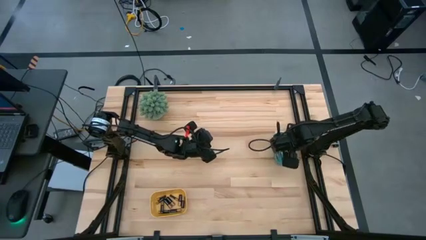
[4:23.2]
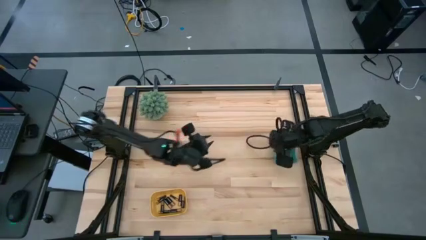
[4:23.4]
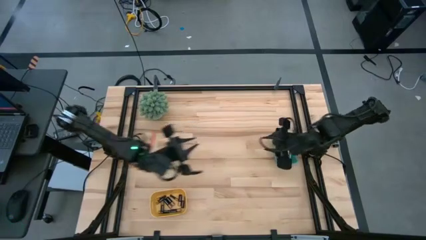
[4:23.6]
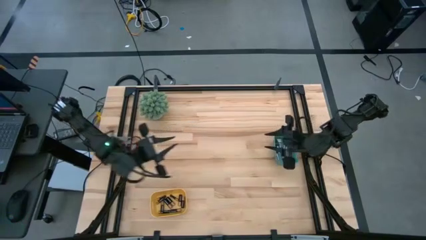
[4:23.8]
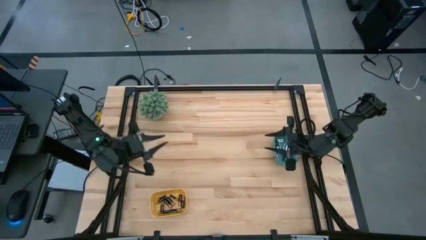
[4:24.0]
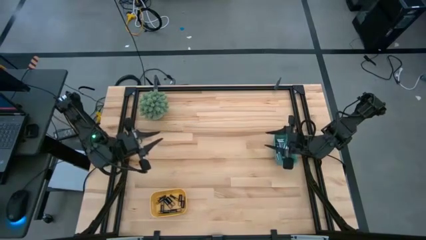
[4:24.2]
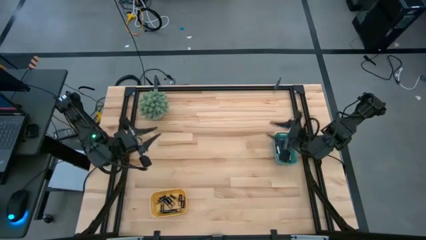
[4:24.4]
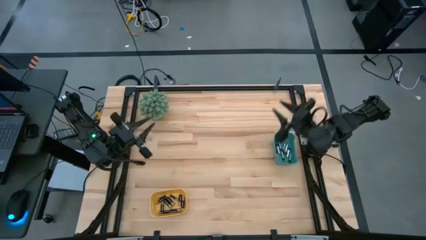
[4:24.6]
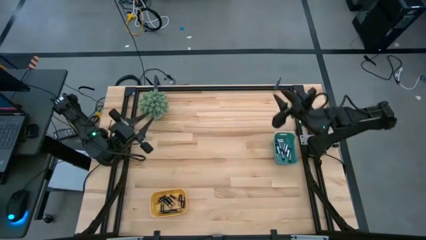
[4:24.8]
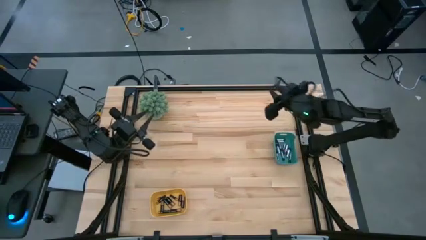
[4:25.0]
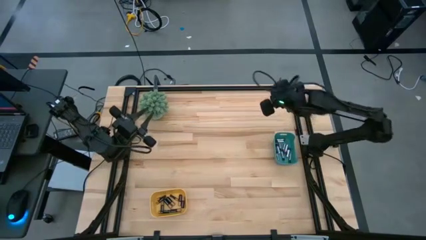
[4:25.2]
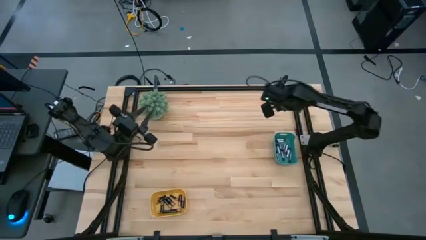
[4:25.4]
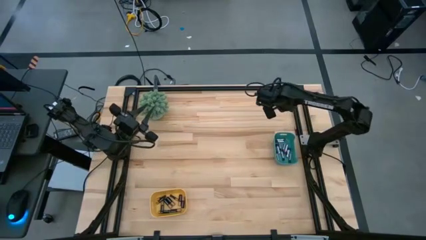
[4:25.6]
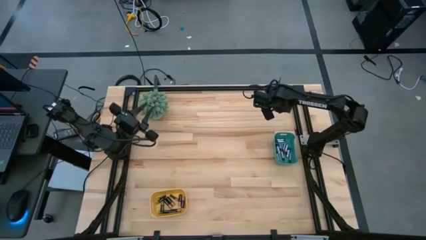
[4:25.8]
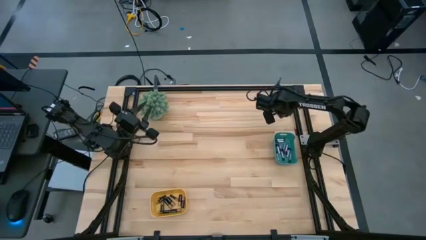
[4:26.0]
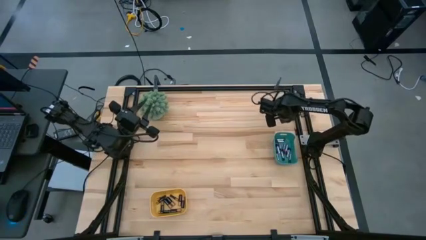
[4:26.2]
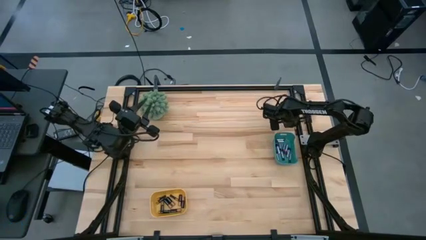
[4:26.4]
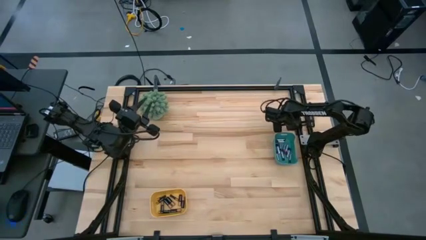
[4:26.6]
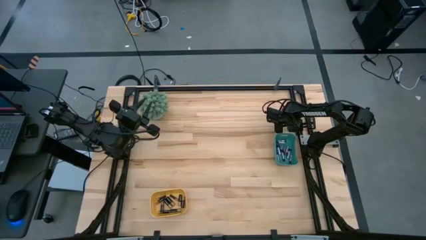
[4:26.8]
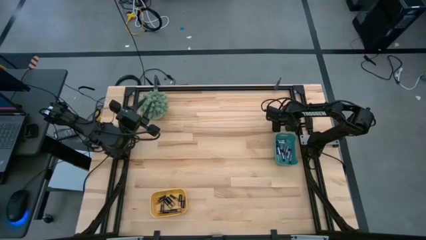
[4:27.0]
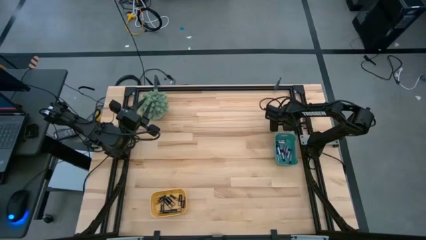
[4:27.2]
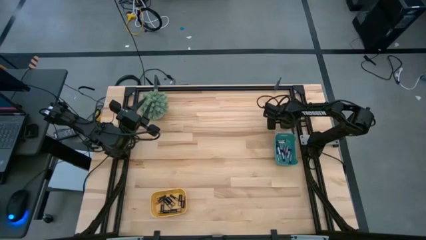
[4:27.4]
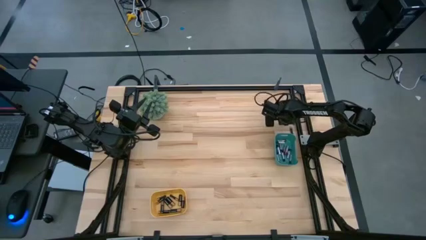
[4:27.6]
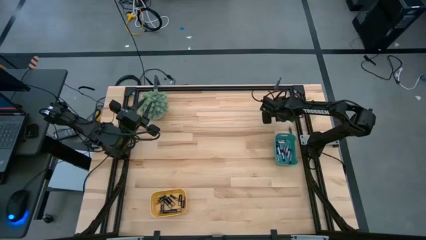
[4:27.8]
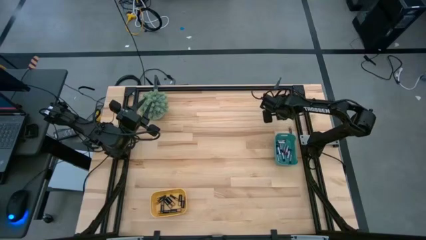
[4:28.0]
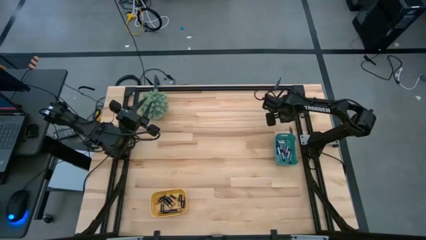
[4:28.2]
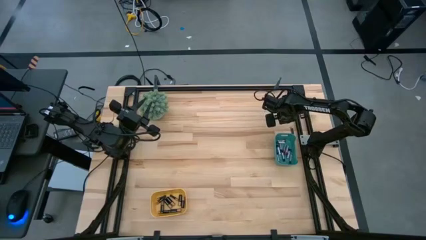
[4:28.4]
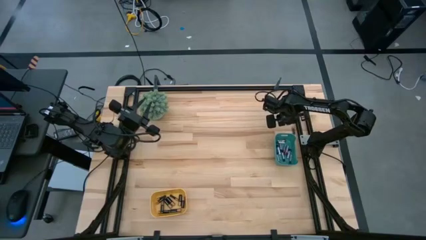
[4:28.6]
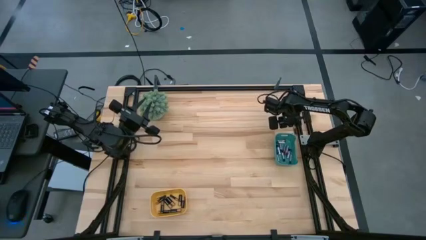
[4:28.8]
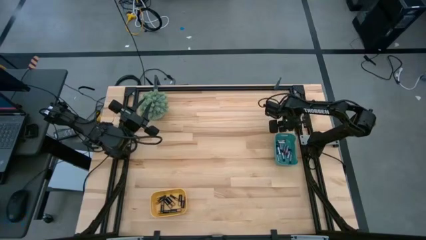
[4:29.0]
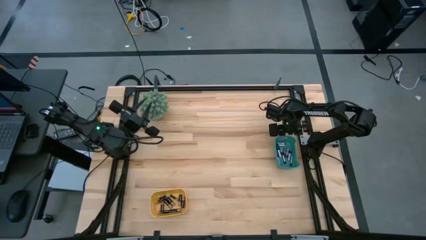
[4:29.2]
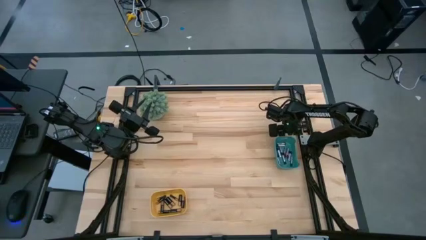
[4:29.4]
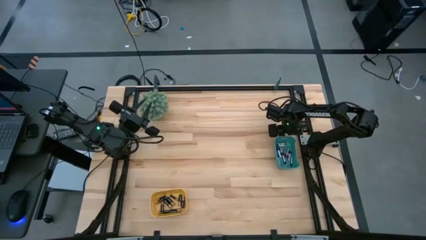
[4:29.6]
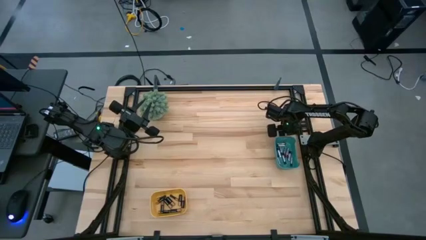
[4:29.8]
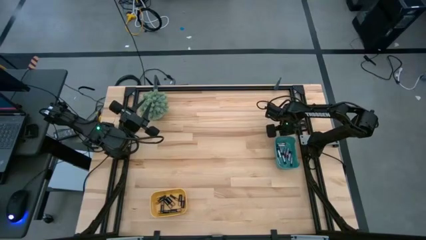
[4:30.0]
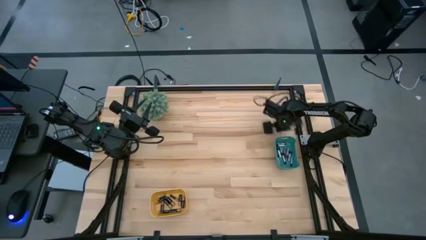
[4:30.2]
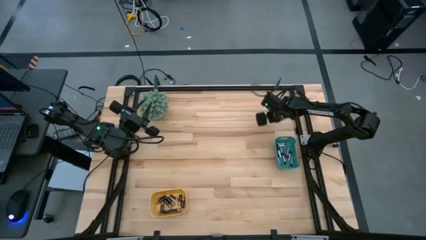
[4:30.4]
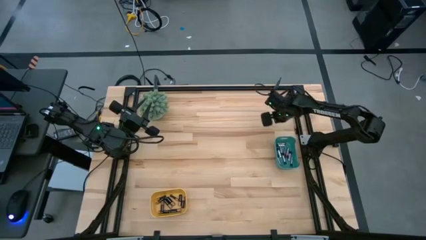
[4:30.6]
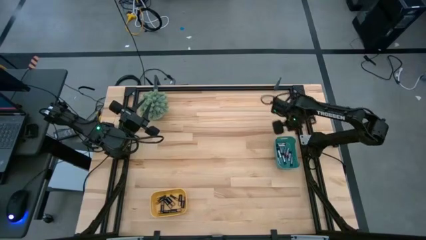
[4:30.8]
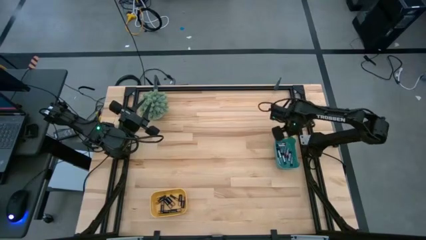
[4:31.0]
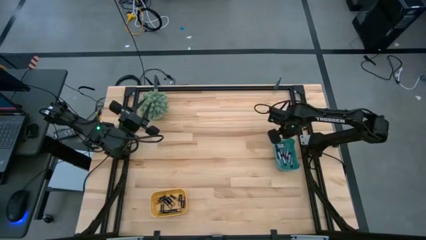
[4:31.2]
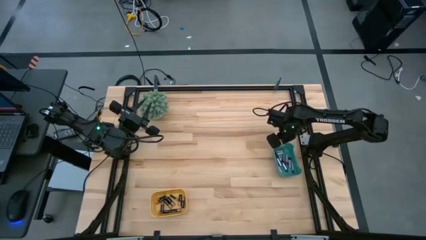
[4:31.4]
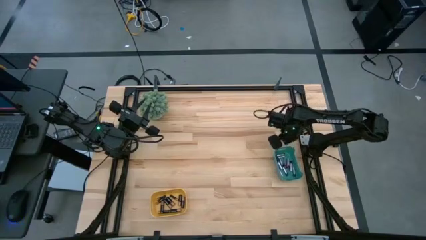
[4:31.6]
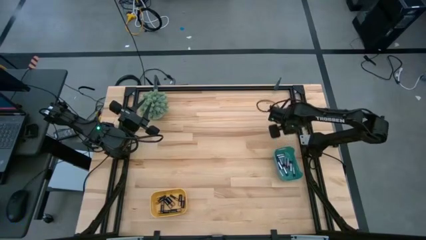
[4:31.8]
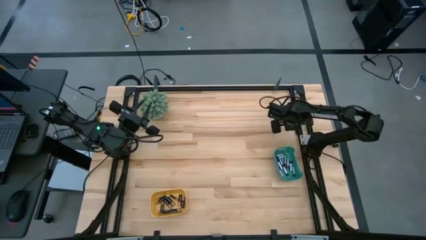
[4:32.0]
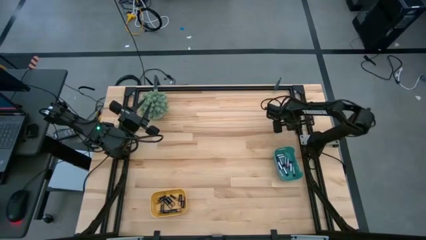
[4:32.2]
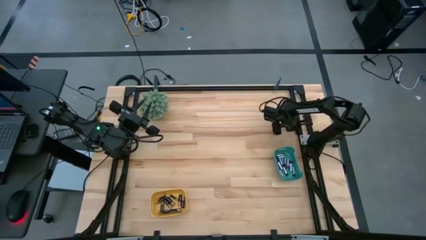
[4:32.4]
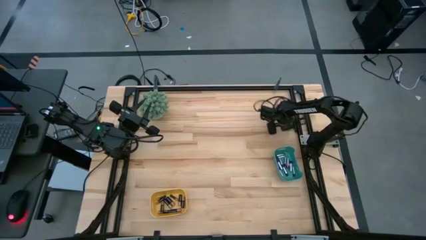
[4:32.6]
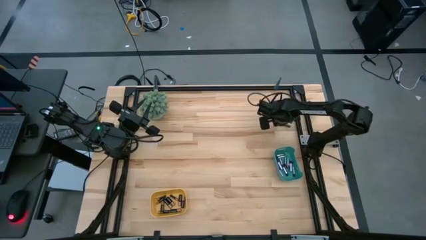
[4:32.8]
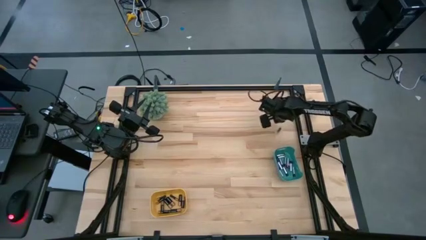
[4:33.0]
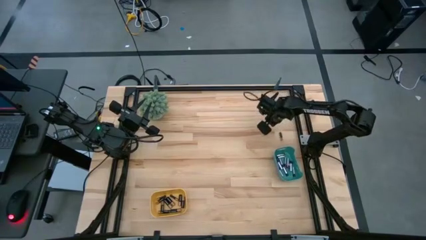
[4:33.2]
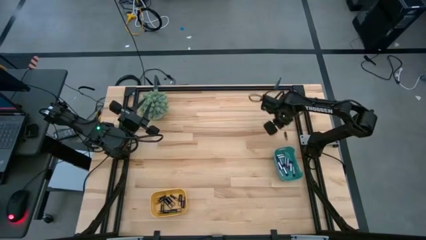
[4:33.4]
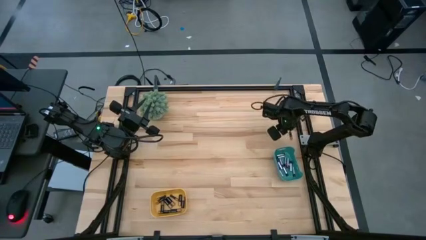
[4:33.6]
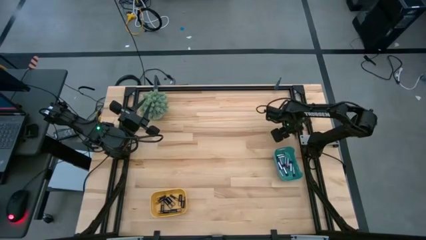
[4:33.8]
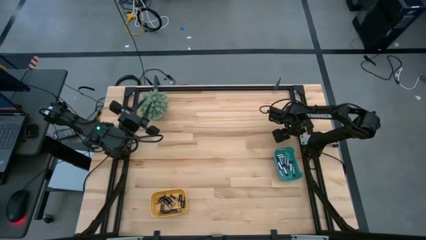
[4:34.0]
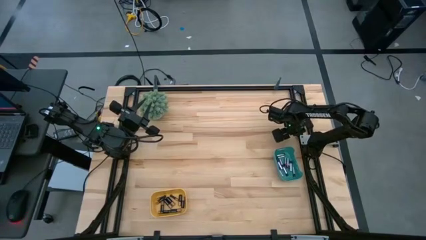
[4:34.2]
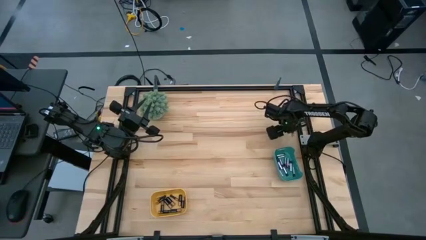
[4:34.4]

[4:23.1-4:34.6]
Task: Sort batteries
Put the black battery into the yellow bin

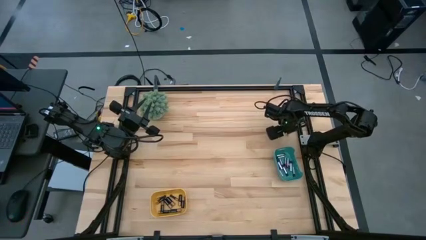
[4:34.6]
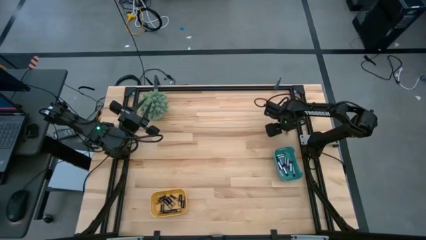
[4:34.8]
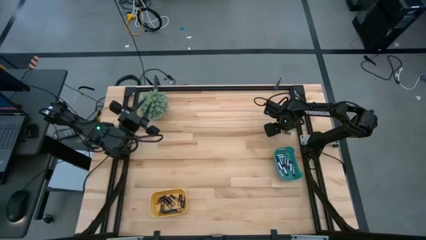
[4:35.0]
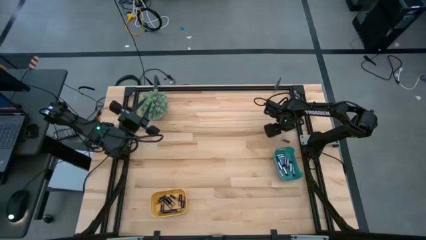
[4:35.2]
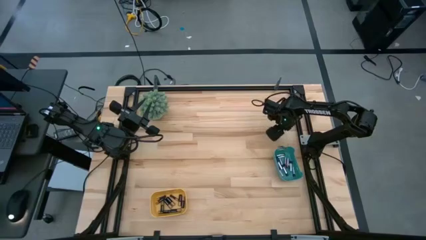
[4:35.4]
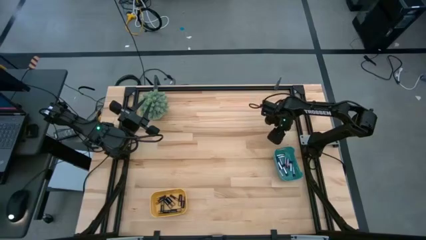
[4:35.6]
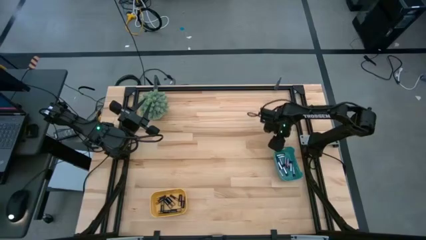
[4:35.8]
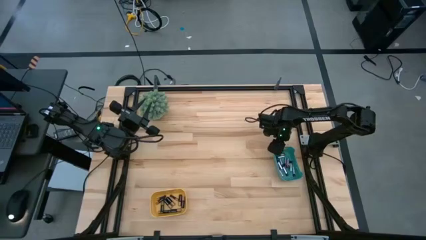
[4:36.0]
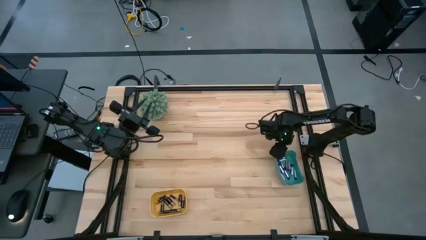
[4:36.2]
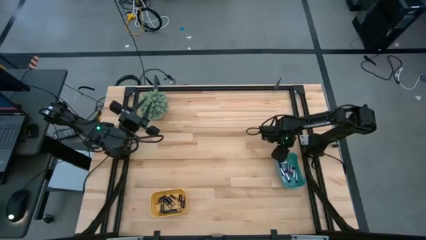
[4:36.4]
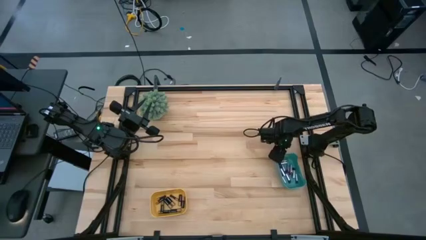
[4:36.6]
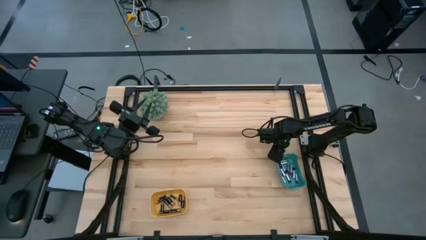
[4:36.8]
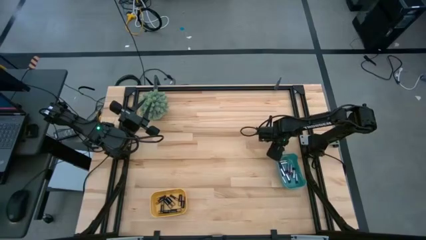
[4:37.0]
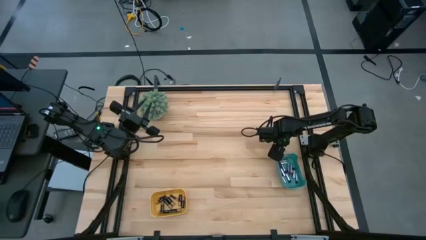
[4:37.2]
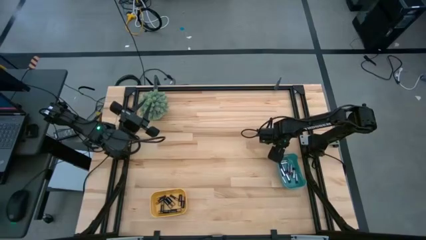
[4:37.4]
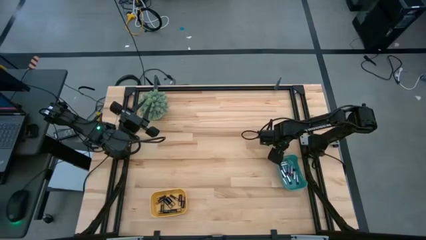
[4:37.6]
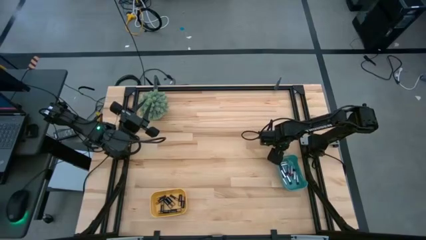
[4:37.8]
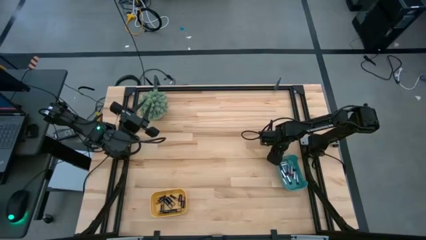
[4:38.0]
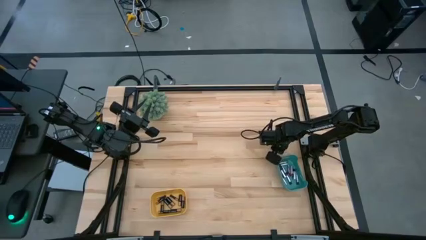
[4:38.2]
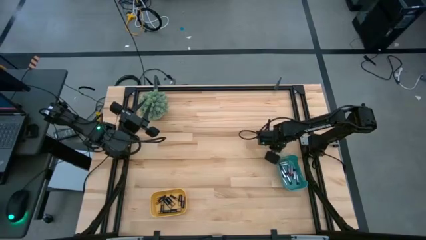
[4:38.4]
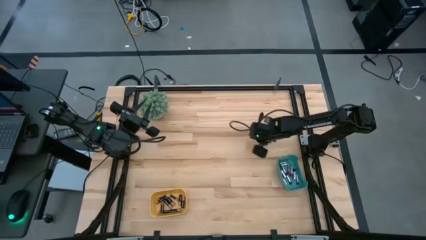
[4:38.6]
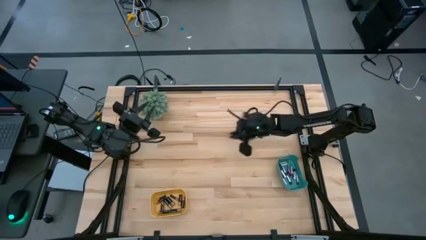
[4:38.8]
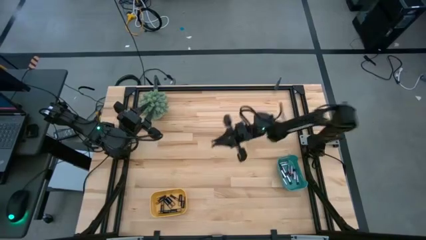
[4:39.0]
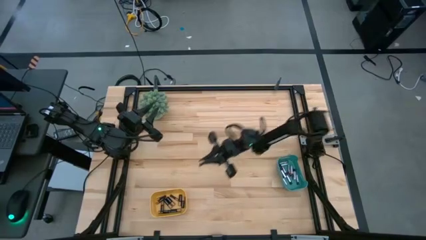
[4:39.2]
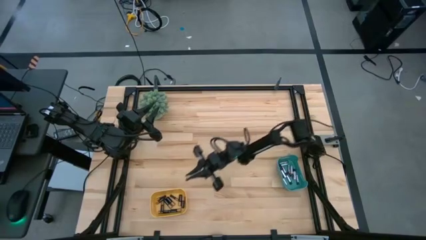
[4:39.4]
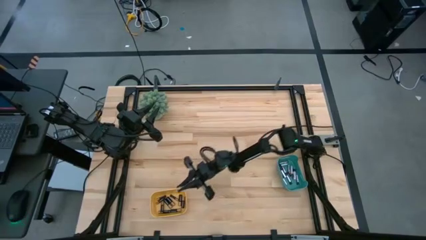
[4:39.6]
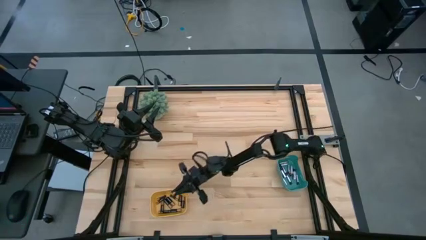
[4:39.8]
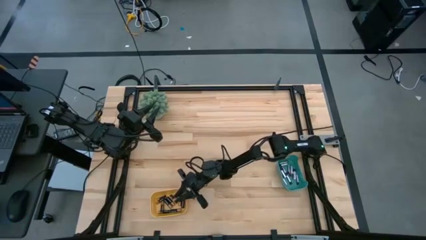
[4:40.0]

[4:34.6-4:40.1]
Put the black battery into the yellow bin
